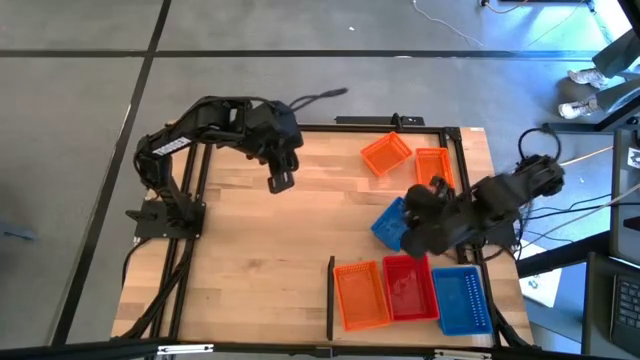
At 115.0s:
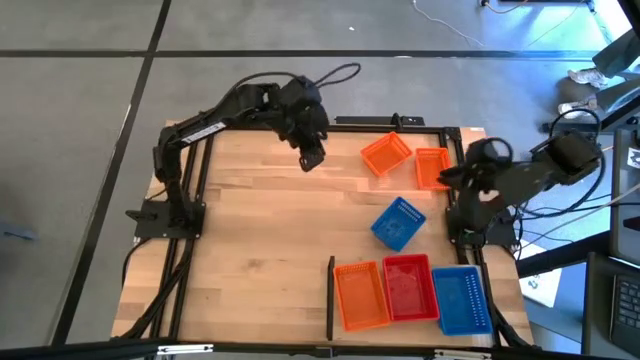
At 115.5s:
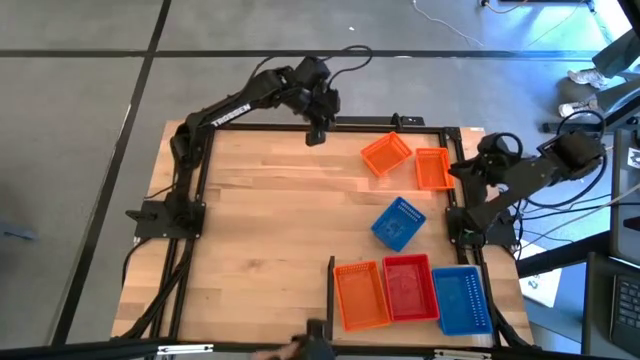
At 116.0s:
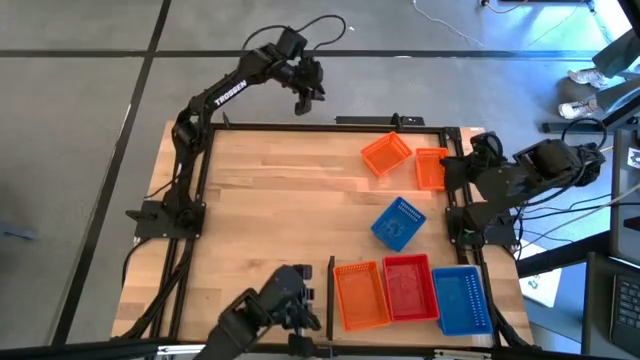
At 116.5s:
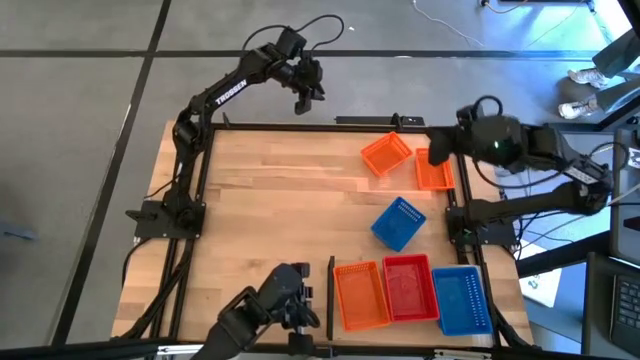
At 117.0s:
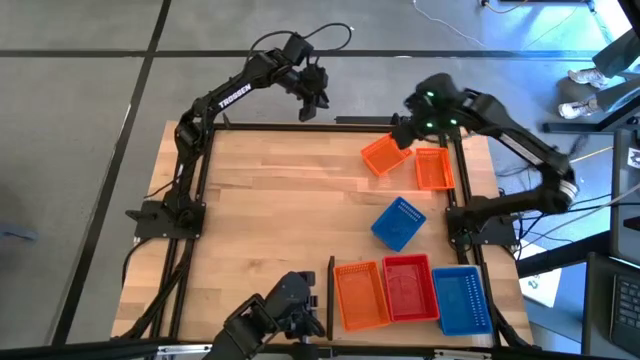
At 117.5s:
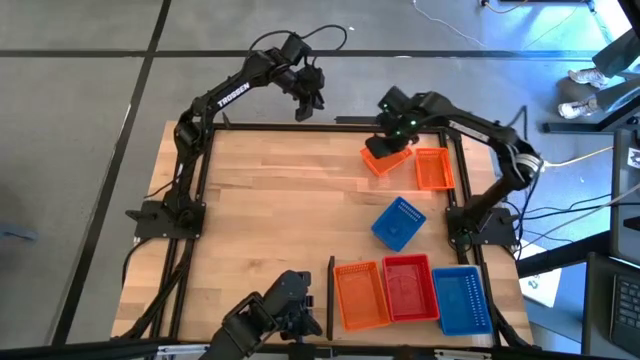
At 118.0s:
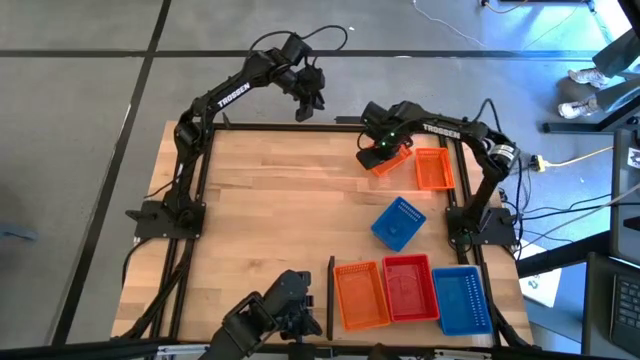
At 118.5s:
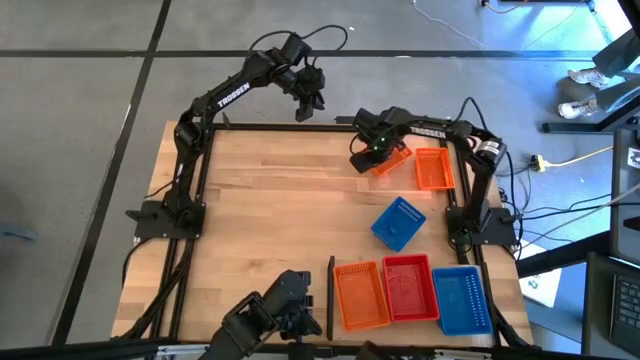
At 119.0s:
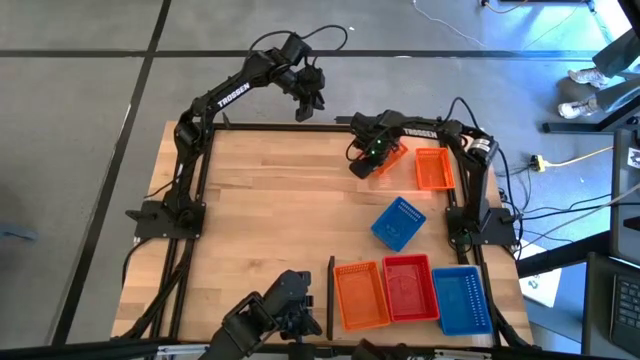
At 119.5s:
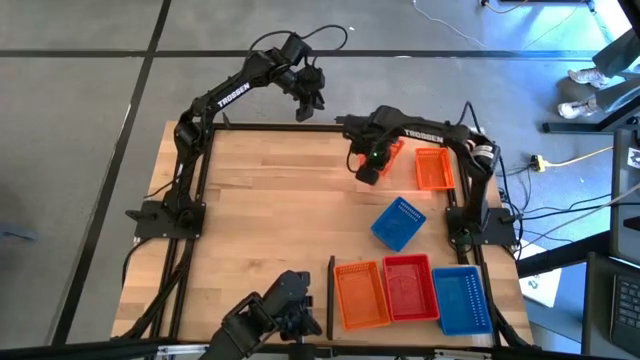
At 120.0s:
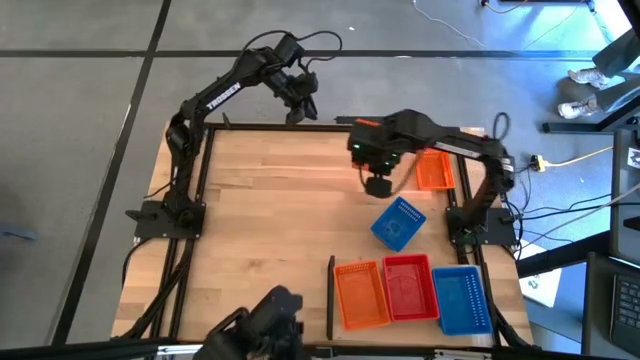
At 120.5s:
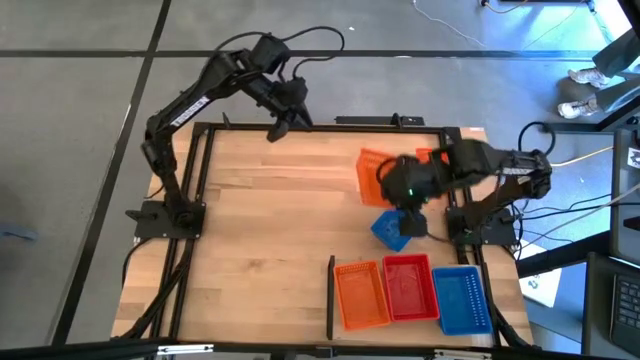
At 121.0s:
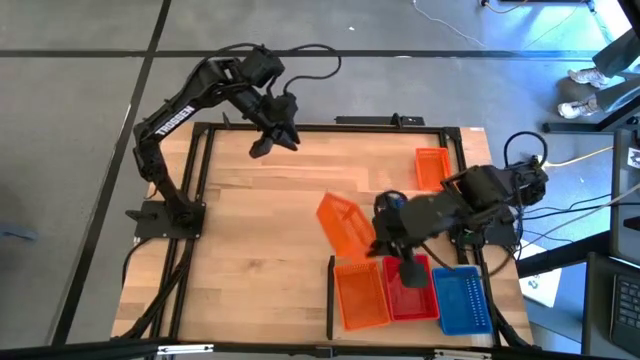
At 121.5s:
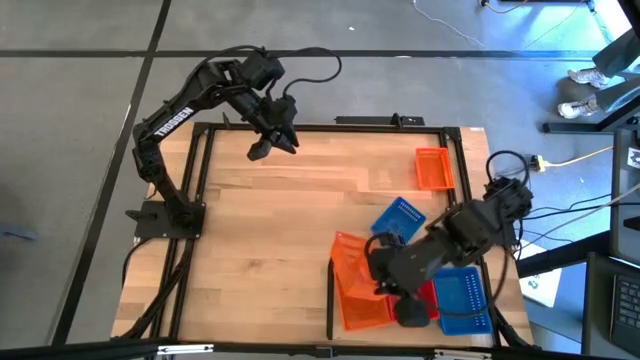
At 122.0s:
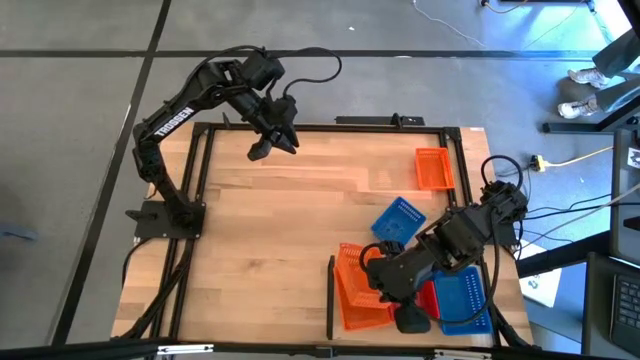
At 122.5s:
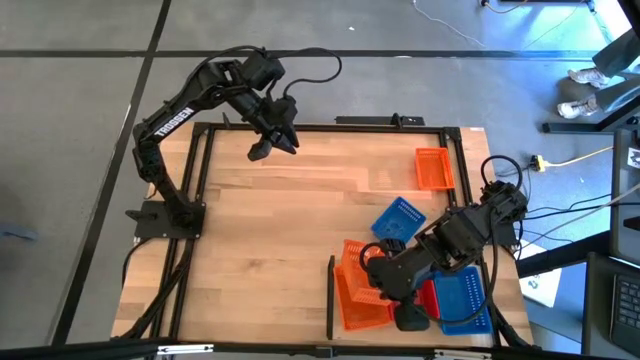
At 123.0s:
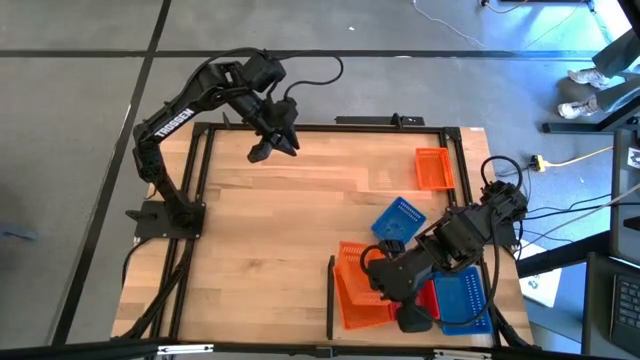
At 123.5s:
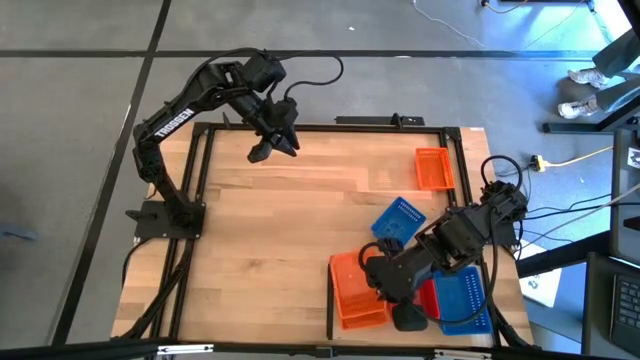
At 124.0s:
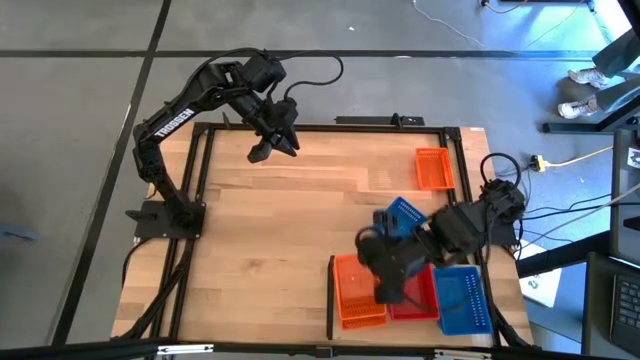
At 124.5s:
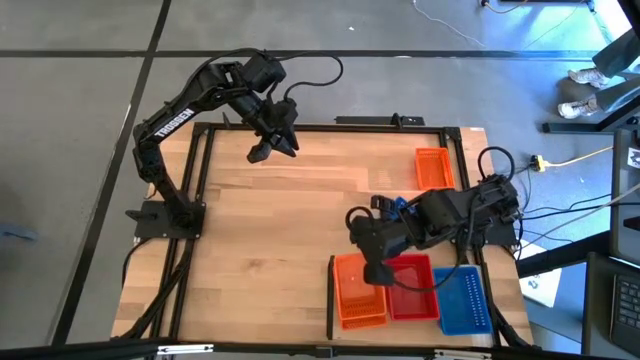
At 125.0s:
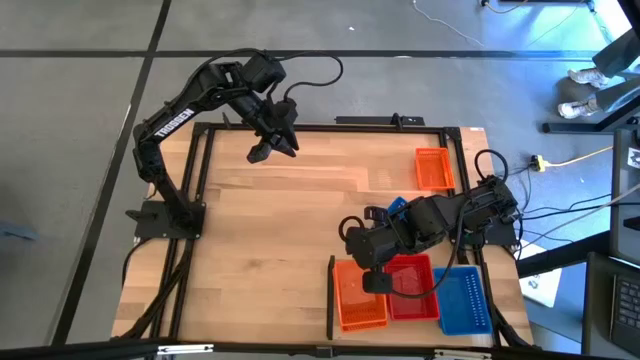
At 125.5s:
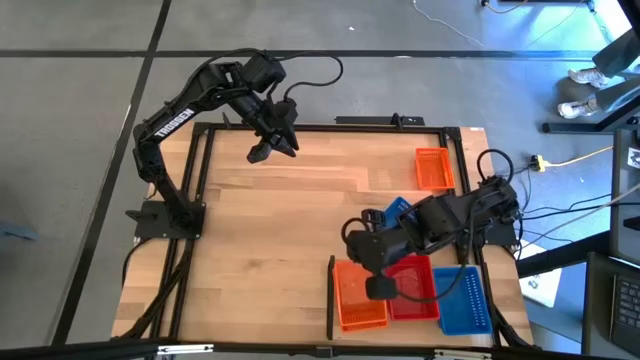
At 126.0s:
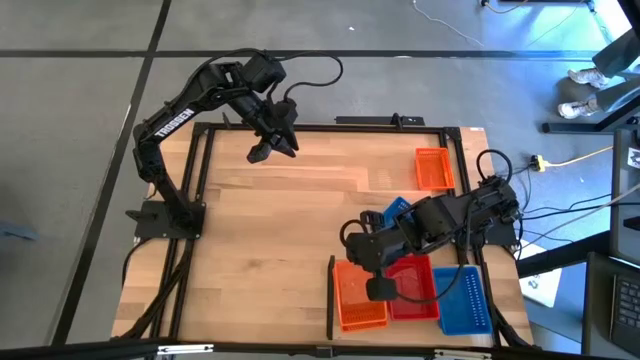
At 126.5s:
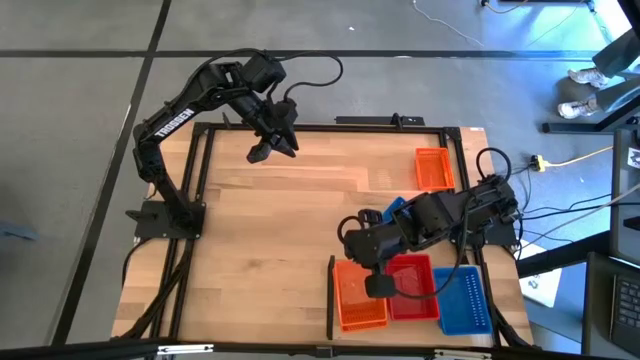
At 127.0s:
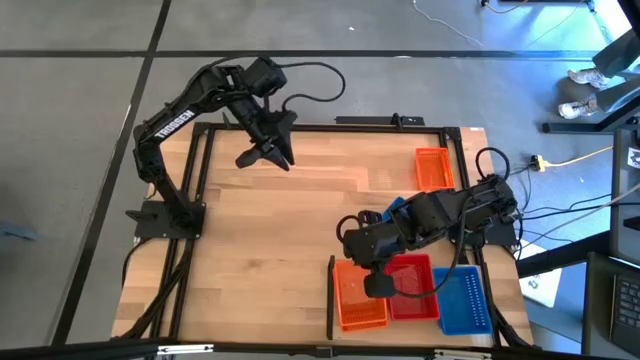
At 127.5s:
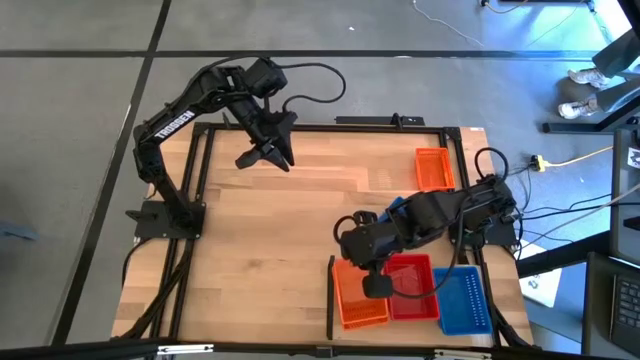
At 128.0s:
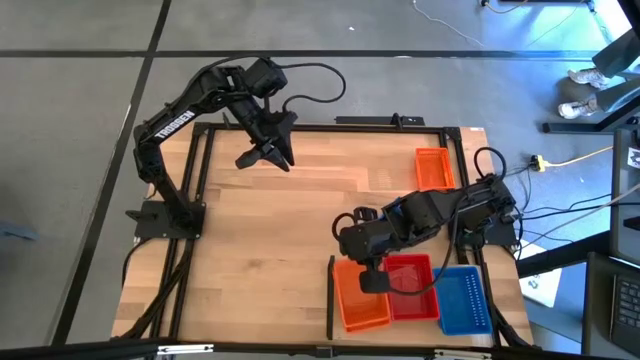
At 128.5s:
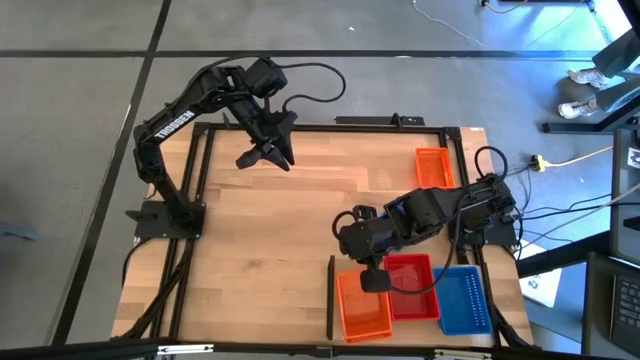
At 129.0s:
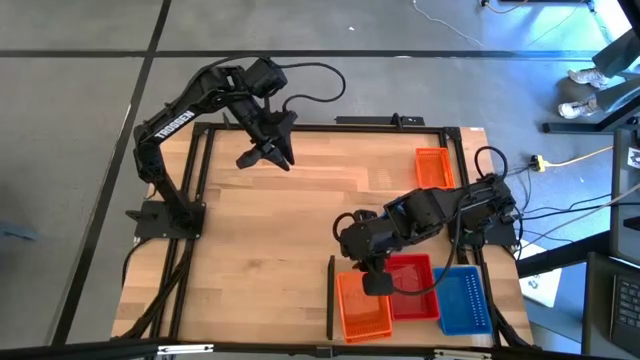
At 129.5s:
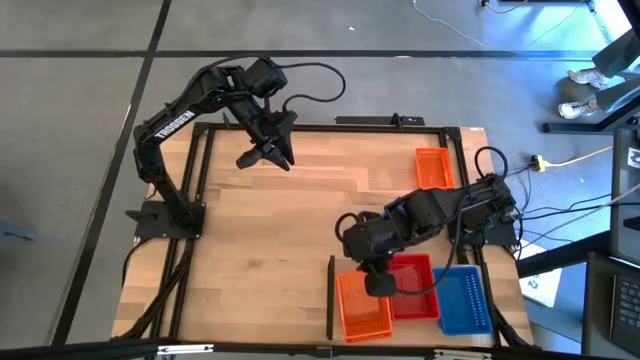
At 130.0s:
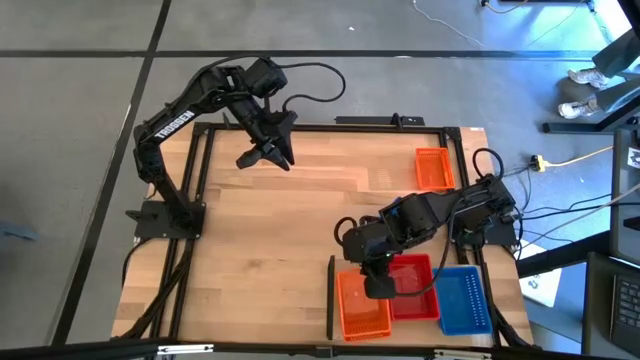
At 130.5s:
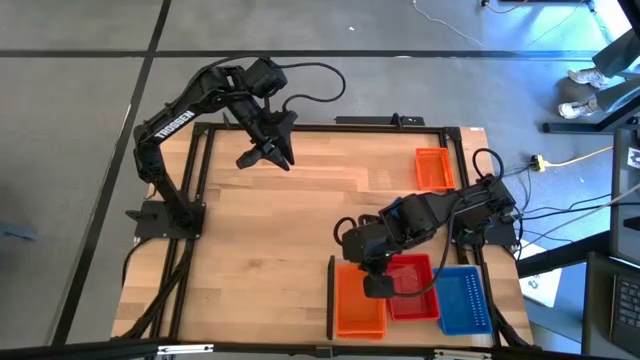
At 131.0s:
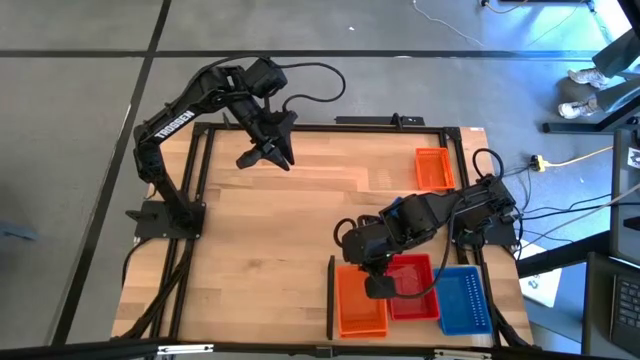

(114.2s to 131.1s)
Task: Stack baskets on shelf by color
Stack the left orange basket on top of the orange basket on the shelf

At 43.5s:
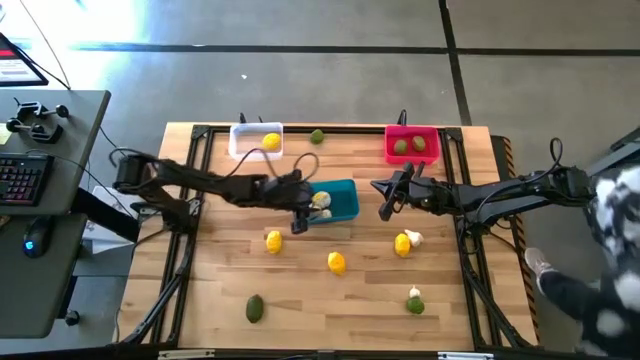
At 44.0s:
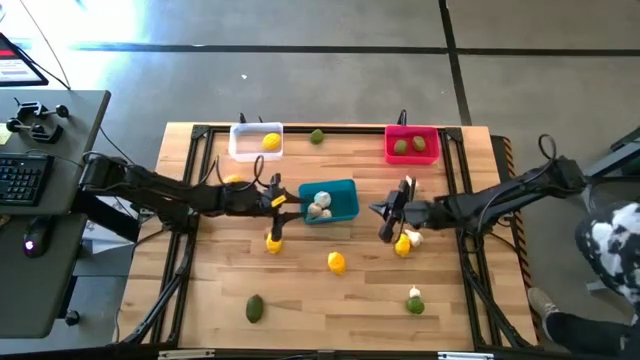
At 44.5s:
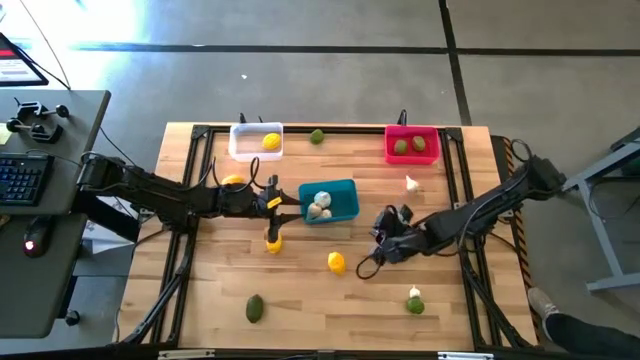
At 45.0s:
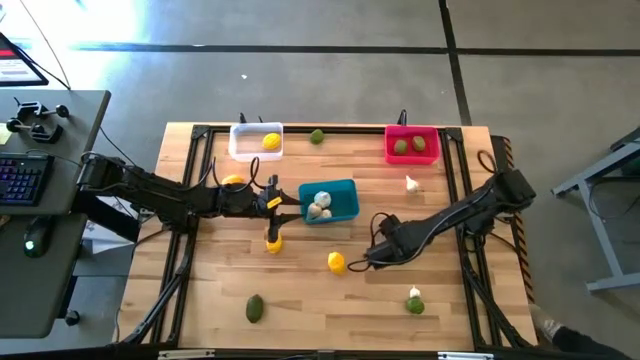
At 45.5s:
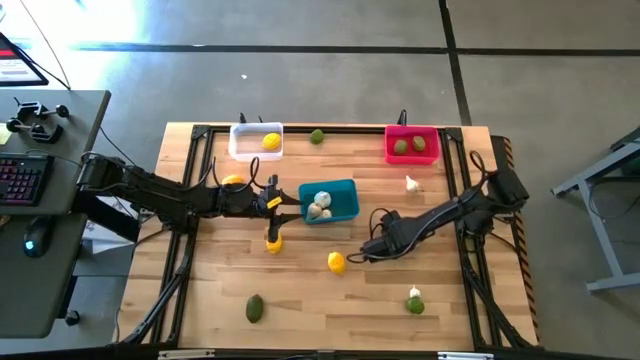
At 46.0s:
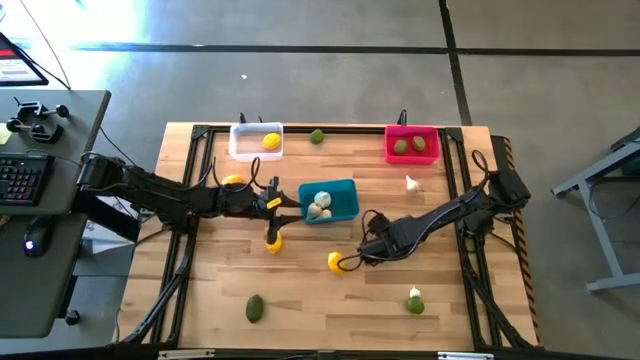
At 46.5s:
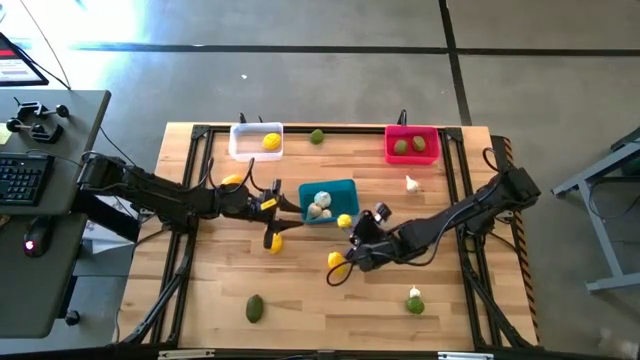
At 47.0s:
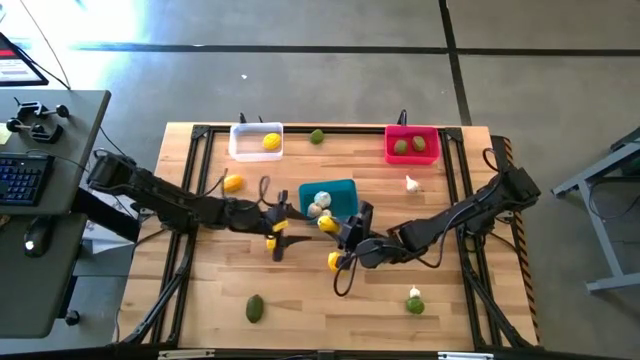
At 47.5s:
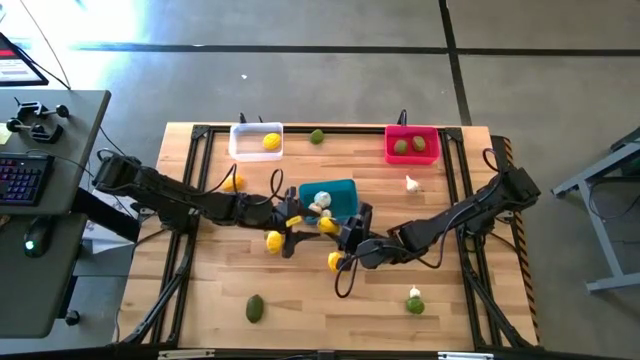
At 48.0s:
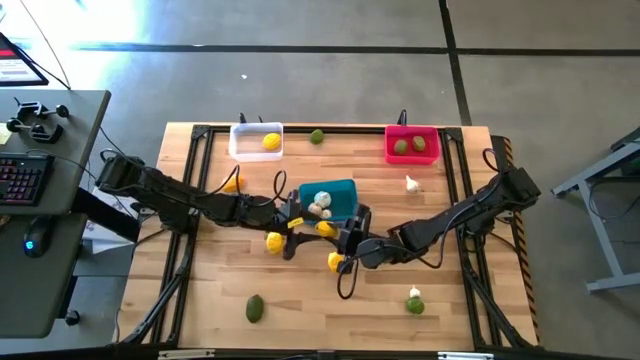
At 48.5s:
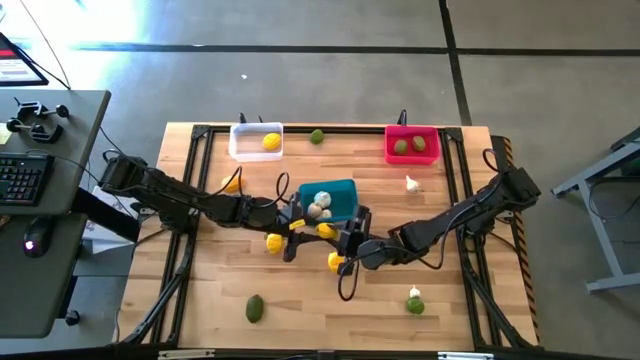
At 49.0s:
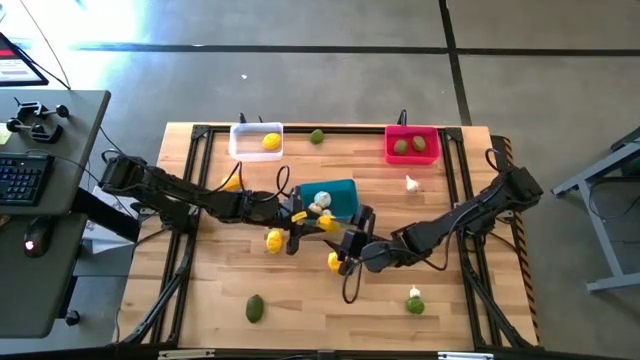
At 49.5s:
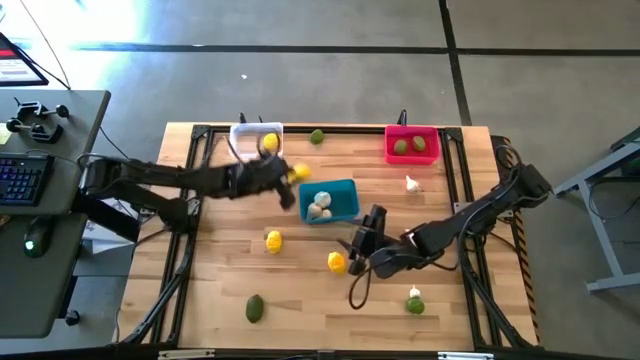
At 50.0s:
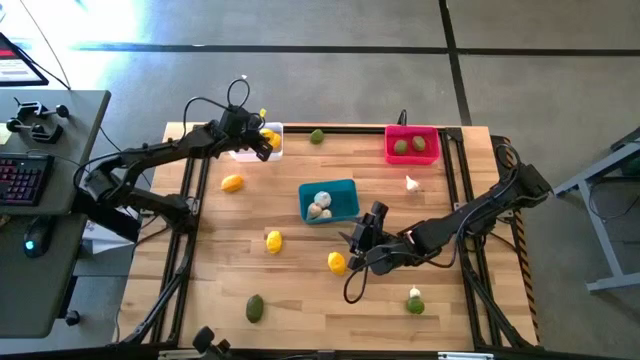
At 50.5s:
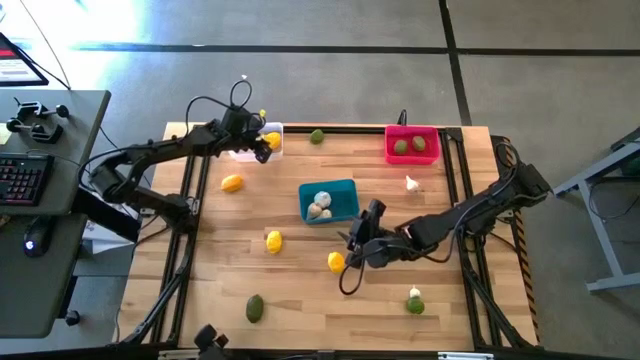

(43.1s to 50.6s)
Task: Sort produce into baskets
Put the lemon into the transparent bin
